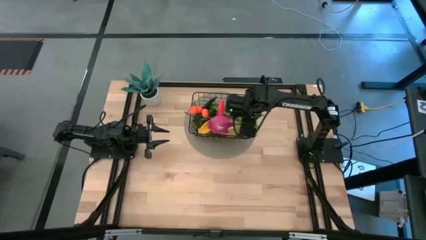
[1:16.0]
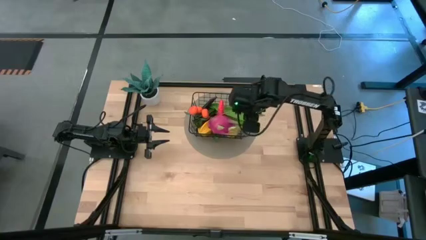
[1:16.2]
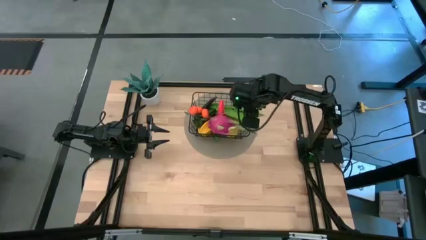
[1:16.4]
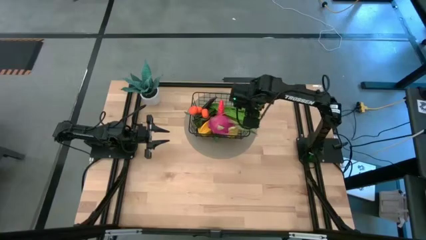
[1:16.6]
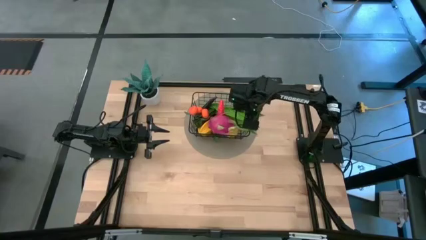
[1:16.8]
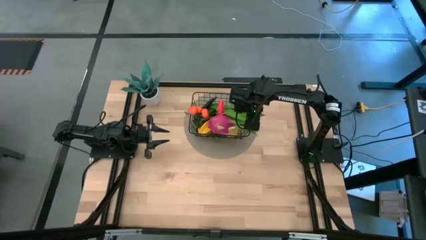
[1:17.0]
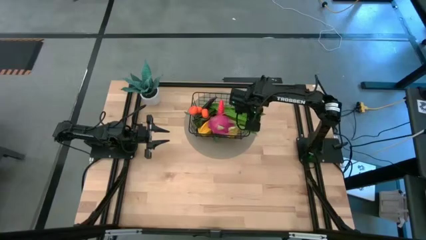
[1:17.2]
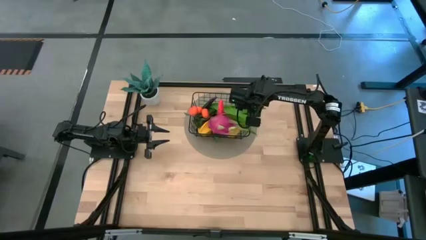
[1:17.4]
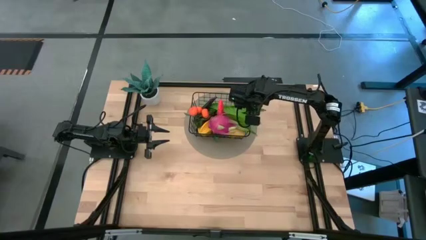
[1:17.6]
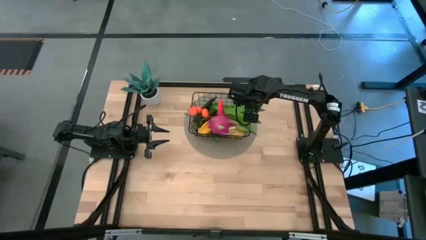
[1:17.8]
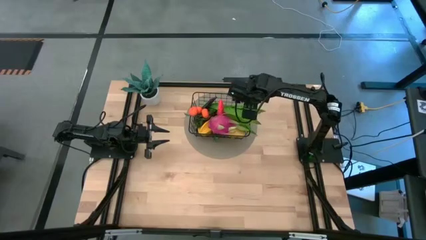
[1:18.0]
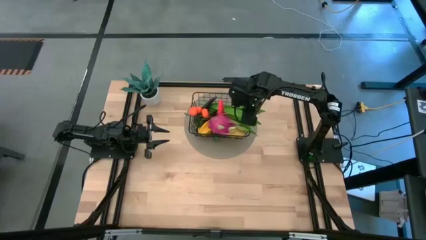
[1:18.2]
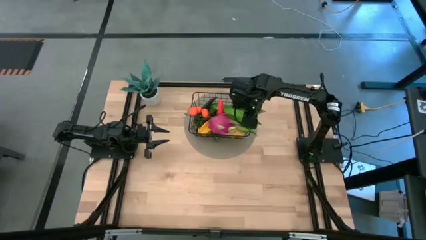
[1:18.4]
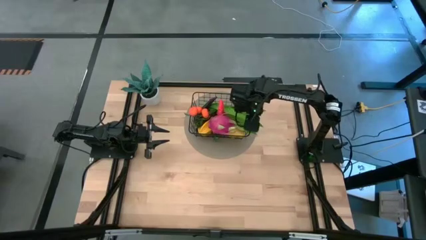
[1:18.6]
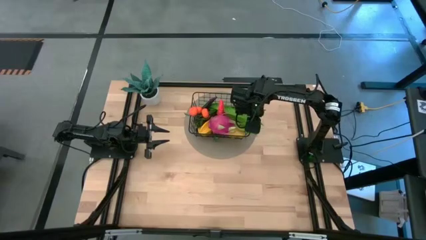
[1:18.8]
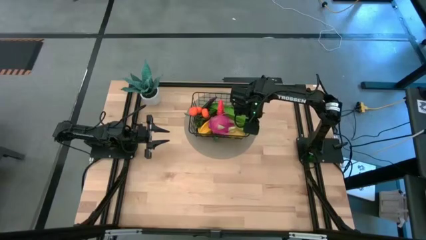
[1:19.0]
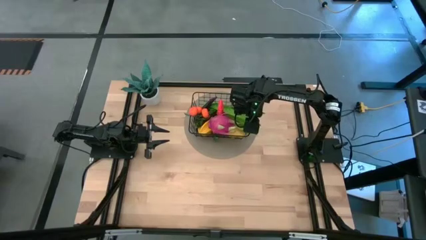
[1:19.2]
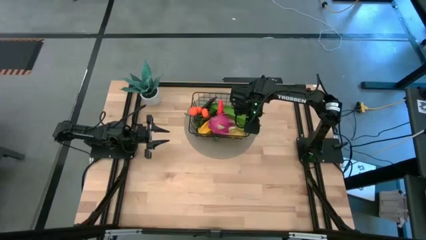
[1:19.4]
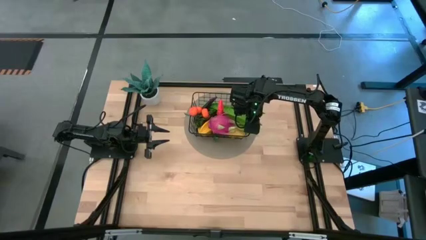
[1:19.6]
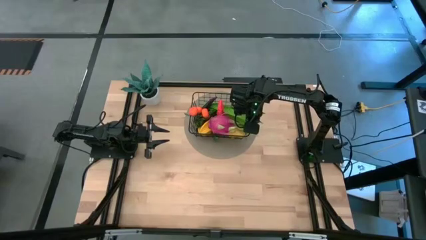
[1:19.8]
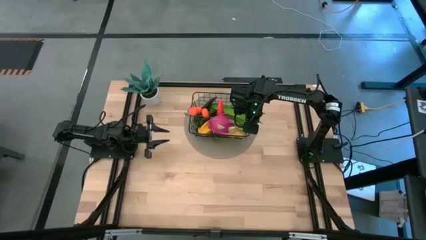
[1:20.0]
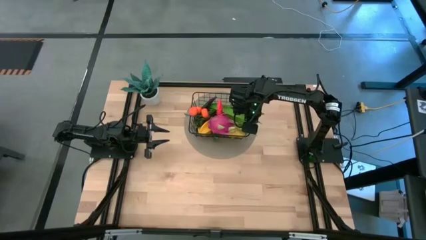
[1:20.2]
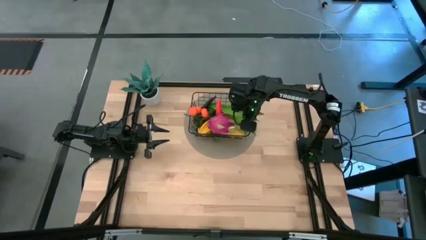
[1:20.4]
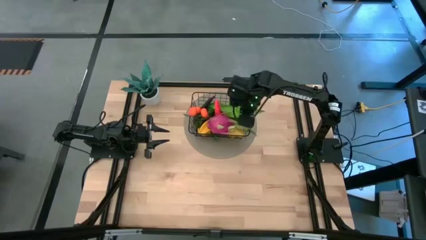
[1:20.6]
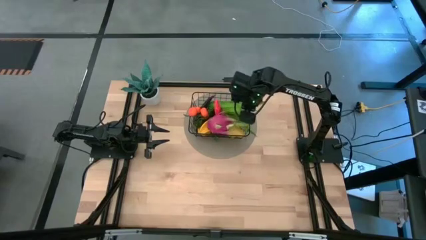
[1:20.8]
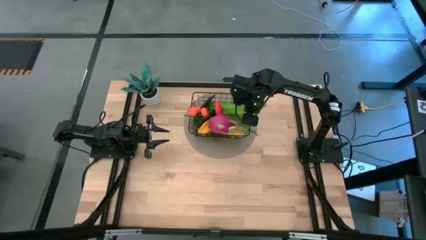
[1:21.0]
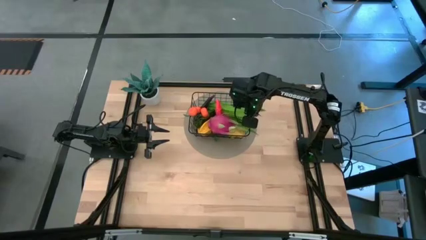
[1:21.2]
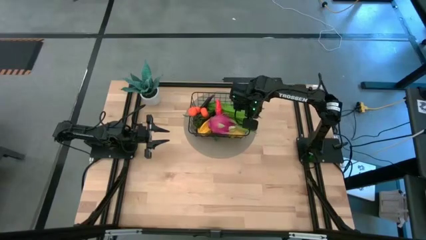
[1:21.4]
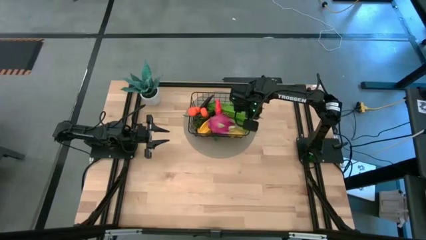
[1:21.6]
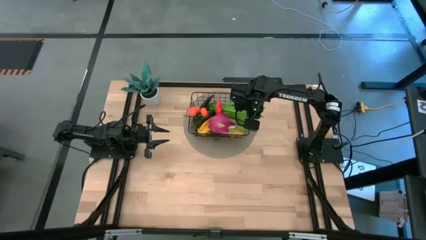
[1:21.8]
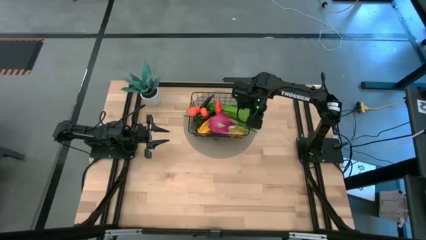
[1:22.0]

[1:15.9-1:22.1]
Task: Build produce basket
Adjust the leaf lettuce

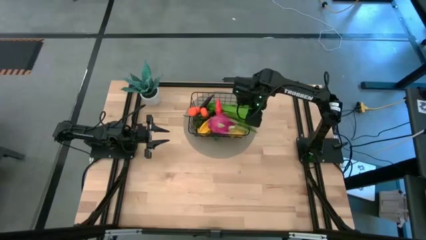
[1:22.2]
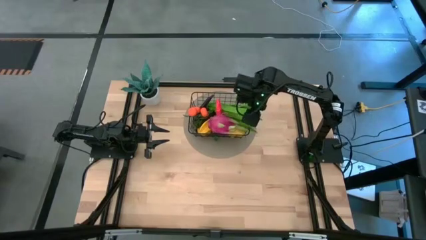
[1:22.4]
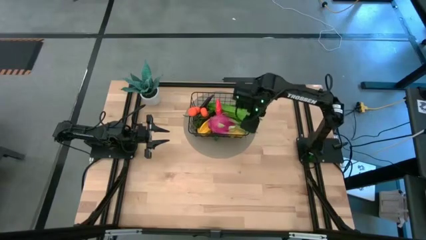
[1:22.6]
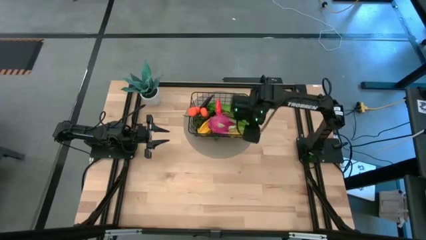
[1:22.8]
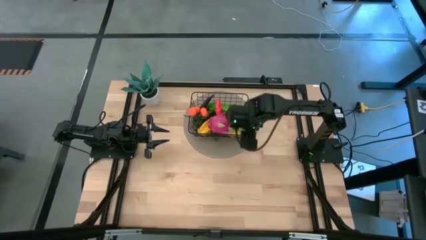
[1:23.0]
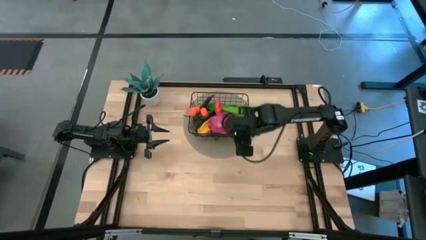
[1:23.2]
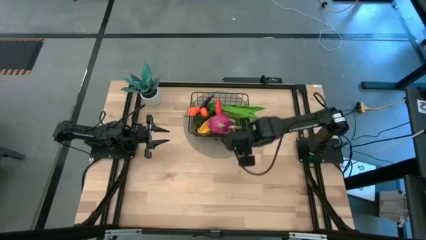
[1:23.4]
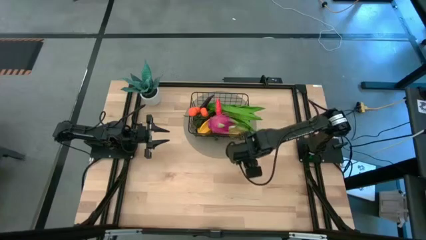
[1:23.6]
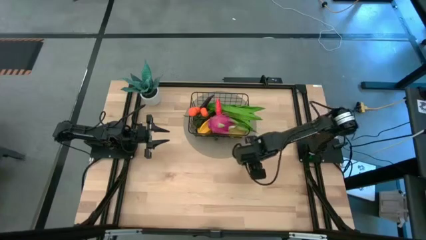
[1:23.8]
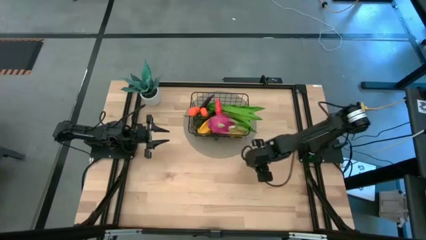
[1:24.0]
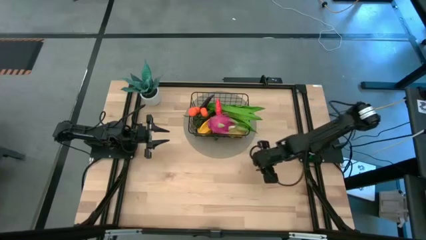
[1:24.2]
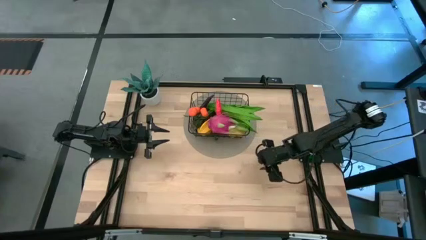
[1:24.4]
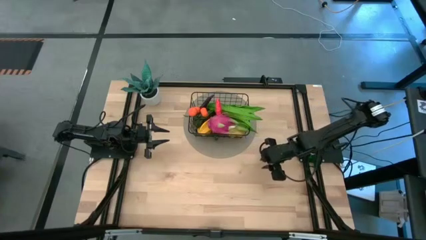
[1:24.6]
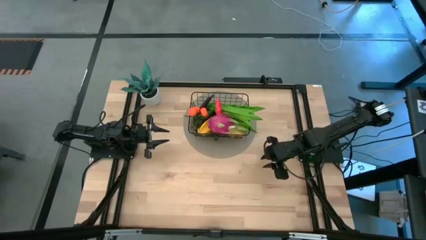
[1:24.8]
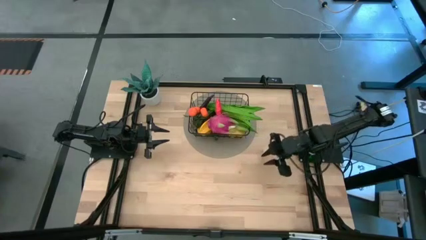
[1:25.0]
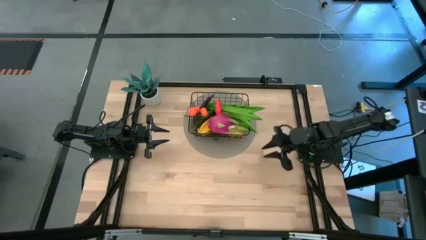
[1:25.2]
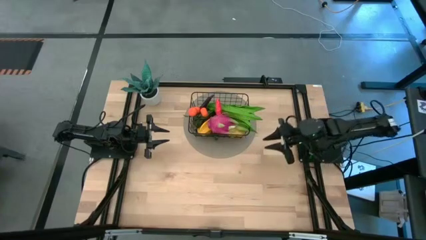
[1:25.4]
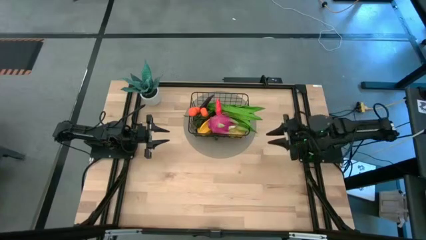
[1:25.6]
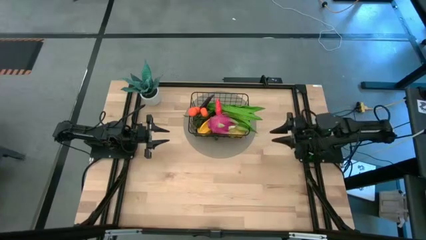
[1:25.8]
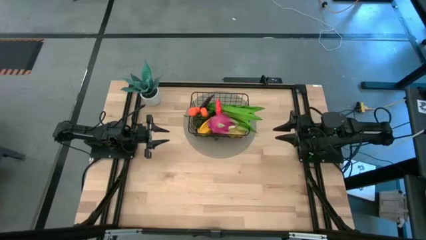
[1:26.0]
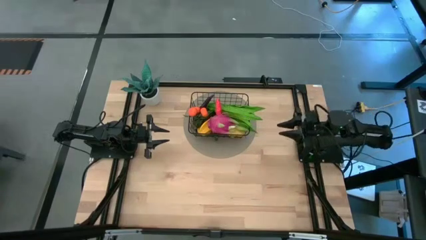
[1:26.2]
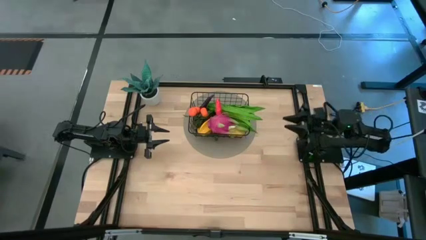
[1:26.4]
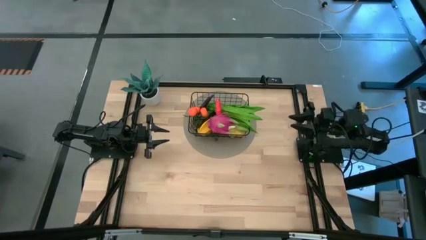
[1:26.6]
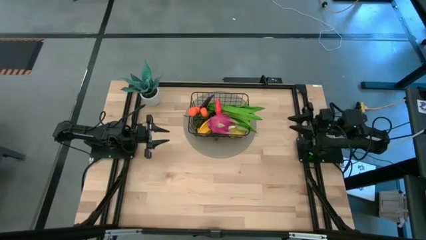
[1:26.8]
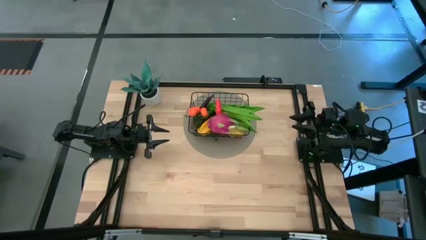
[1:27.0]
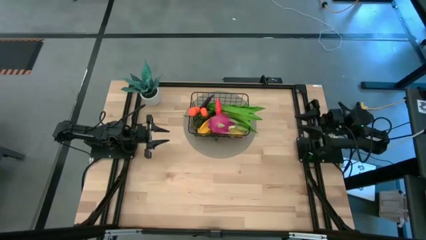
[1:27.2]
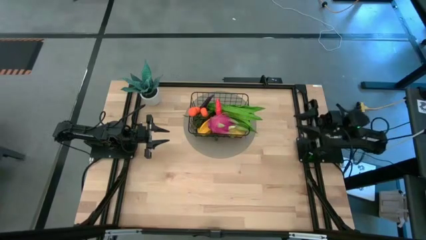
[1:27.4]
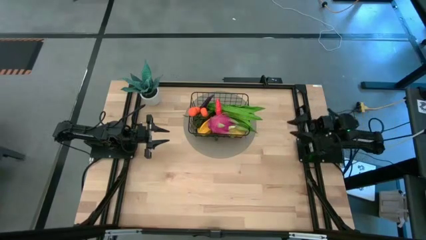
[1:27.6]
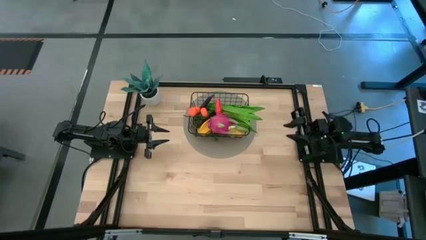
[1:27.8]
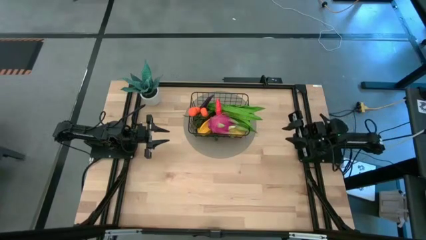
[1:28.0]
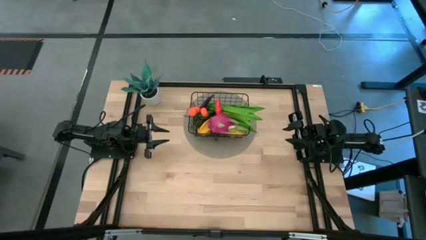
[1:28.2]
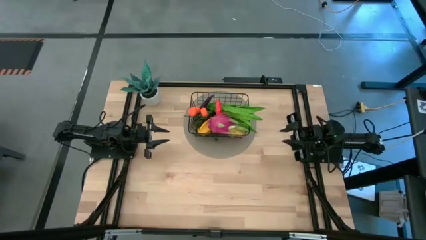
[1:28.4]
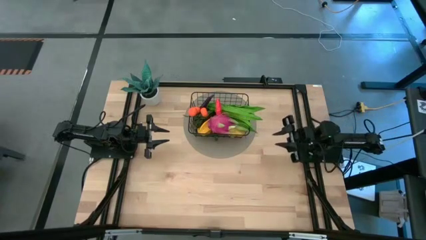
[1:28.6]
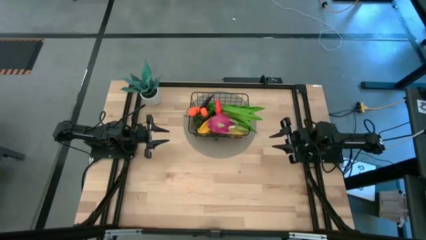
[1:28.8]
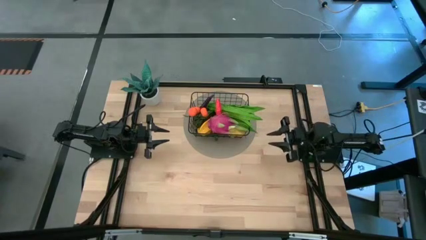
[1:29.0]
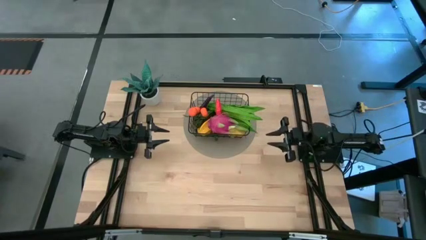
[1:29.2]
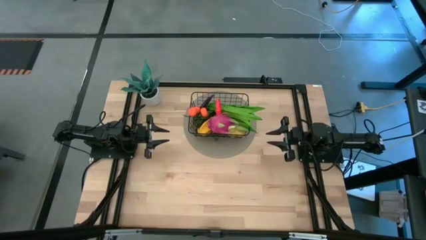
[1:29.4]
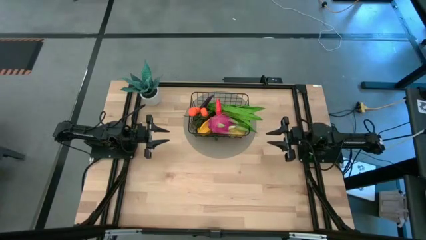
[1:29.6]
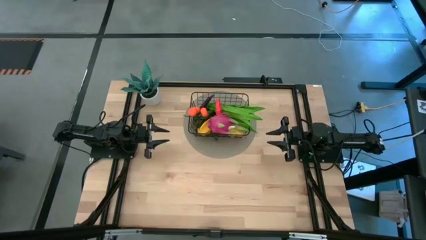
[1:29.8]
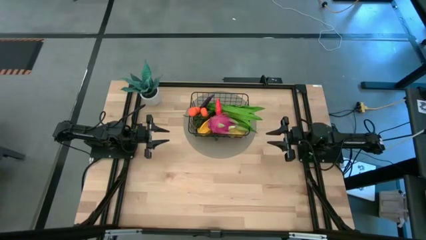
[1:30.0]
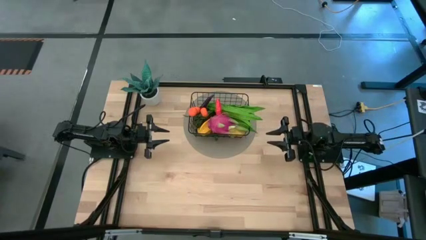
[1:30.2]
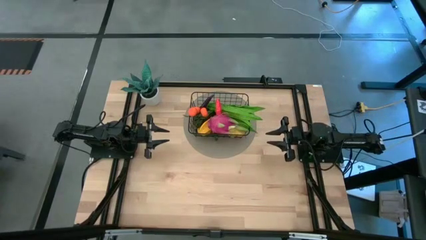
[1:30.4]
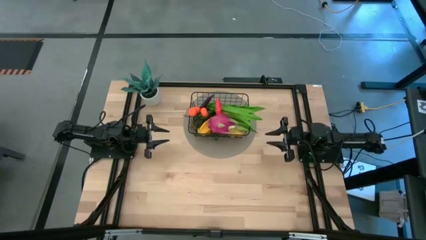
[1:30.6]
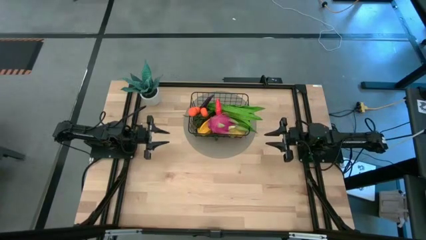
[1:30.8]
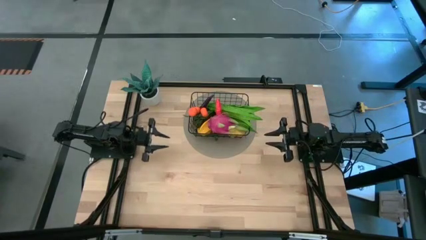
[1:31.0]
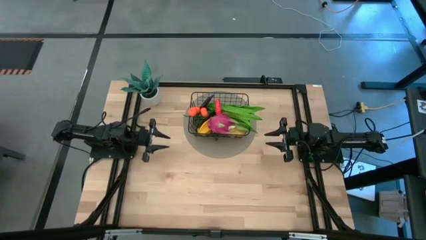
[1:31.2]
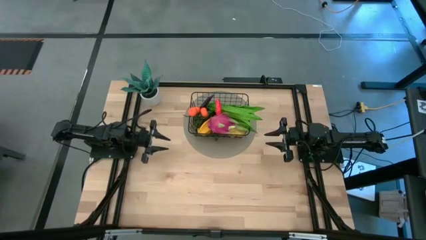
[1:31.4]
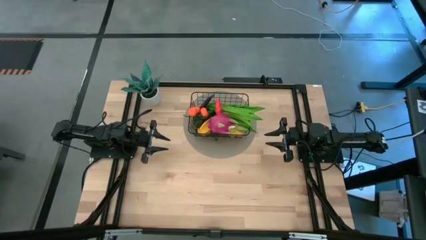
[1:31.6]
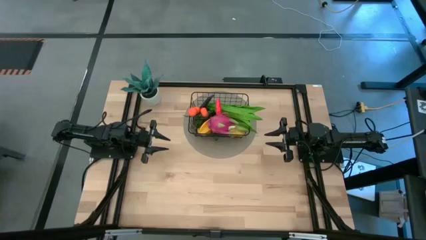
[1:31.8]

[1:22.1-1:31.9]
Return to Home Position

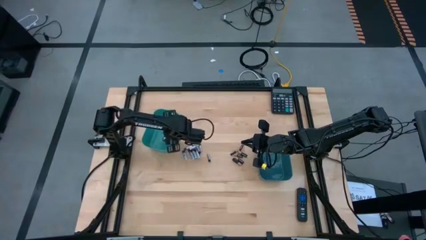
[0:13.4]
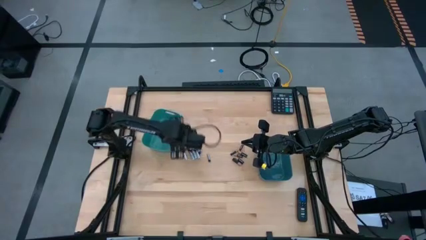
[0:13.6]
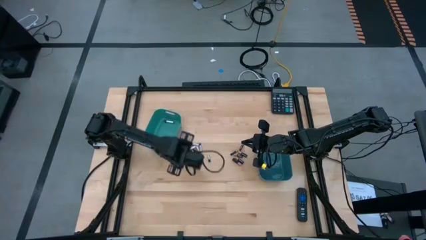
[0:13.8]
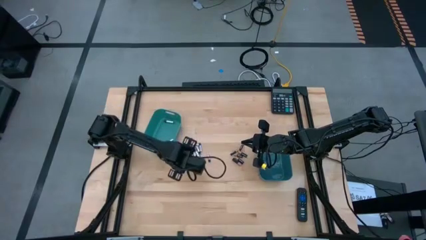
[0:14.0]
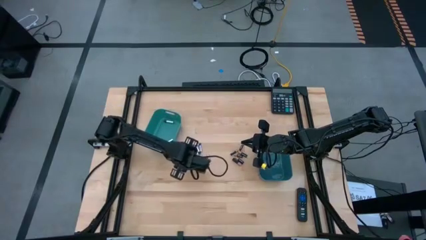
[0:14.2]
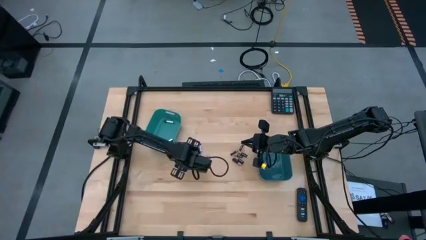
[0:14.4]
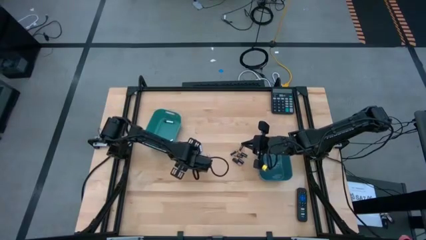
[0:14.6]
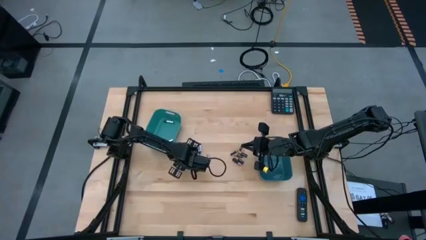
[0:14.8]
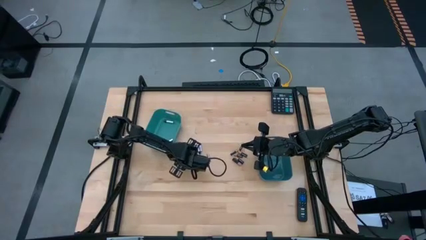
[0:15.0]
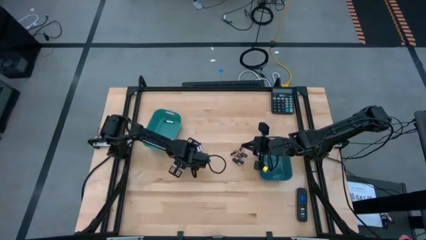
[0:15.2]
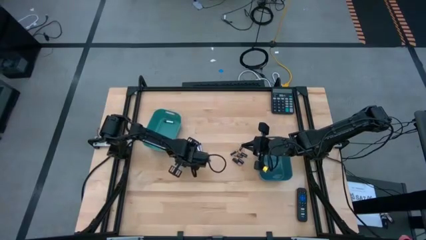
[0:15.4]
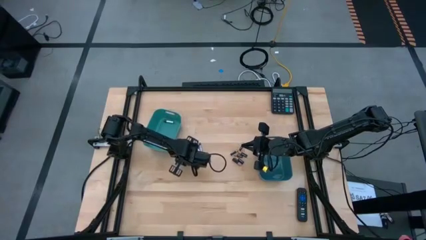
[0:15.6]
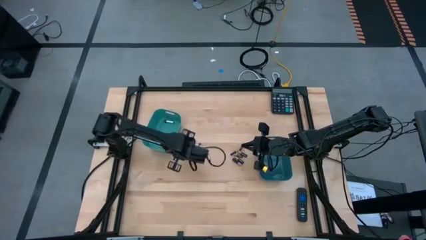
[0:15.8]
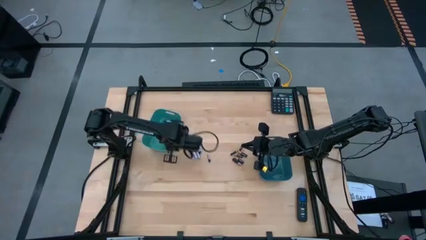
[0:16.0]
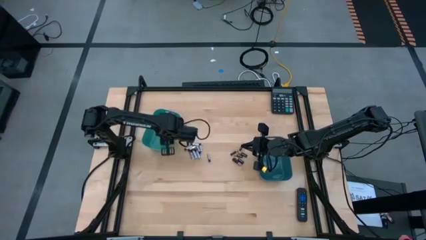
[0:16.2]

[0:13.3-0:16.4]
Task: Sort batteries
Put the silver battery into the green bin
